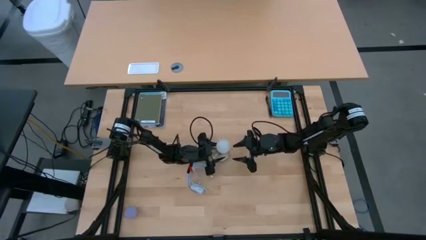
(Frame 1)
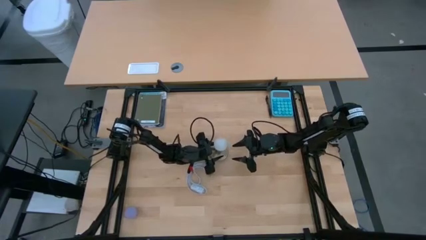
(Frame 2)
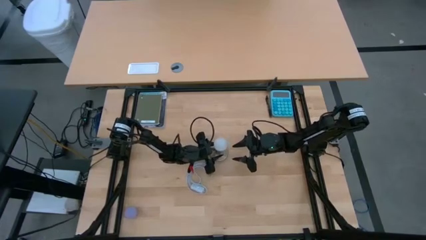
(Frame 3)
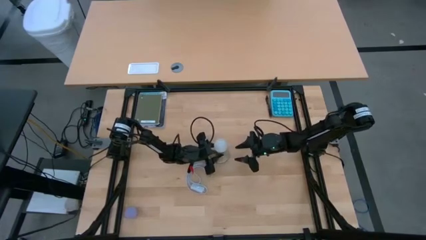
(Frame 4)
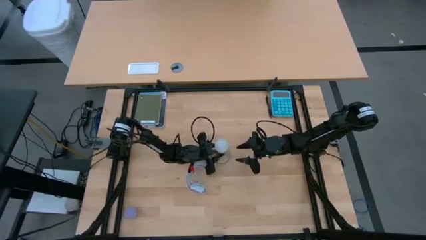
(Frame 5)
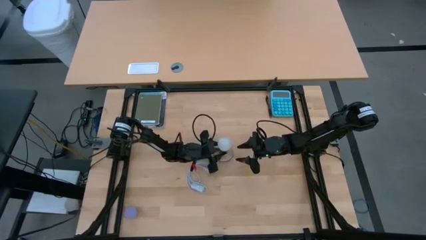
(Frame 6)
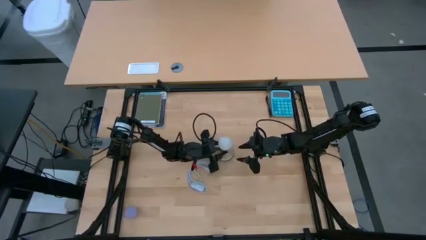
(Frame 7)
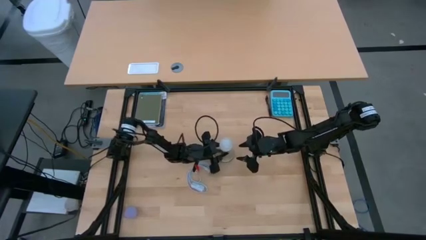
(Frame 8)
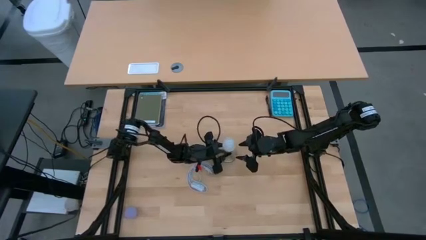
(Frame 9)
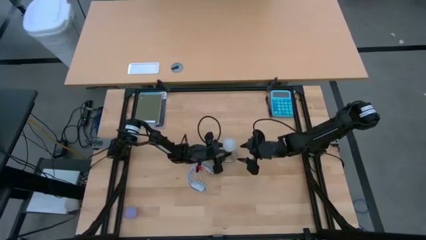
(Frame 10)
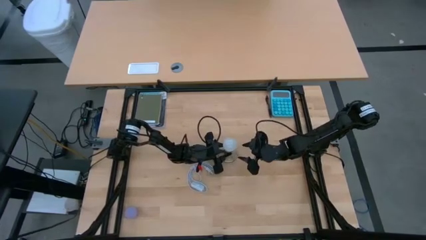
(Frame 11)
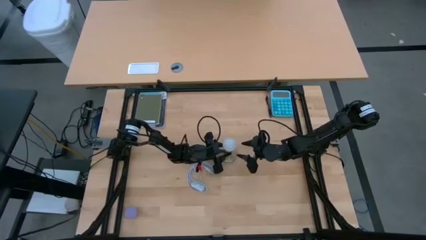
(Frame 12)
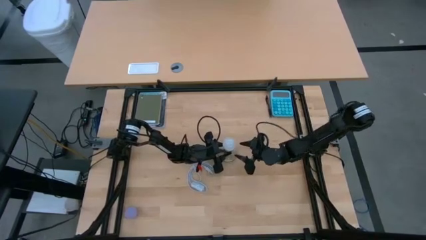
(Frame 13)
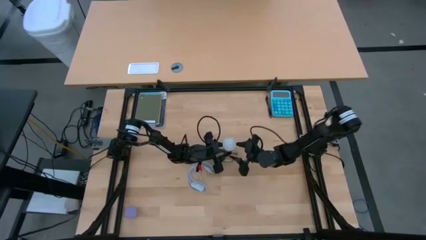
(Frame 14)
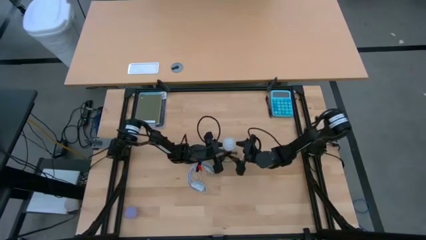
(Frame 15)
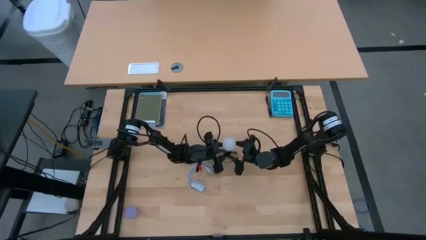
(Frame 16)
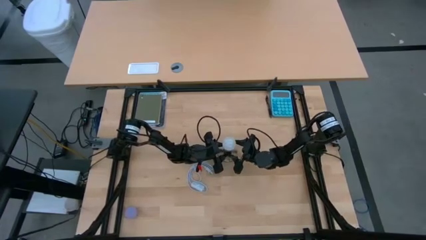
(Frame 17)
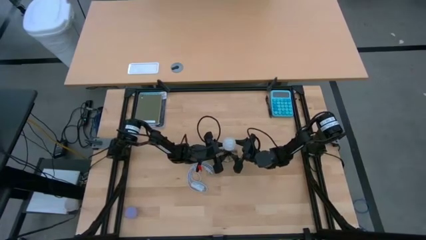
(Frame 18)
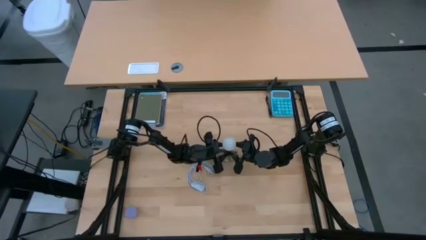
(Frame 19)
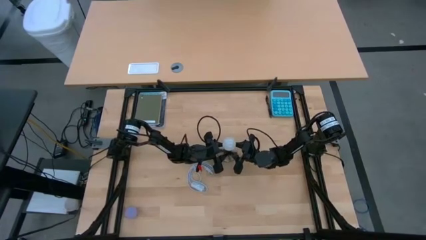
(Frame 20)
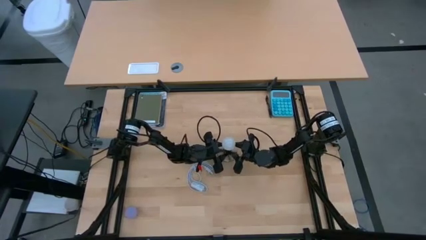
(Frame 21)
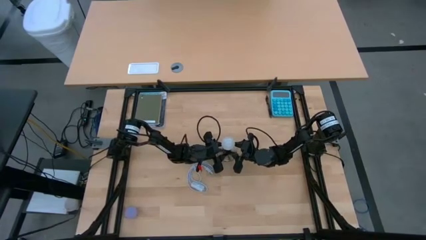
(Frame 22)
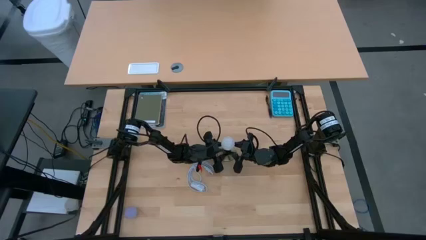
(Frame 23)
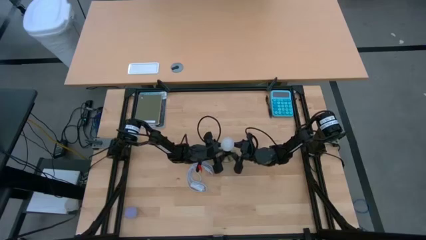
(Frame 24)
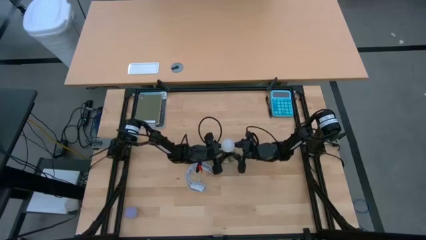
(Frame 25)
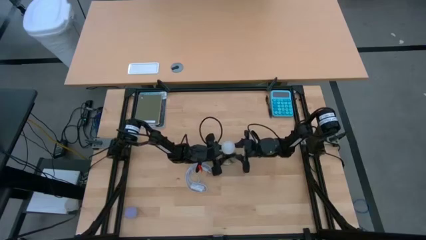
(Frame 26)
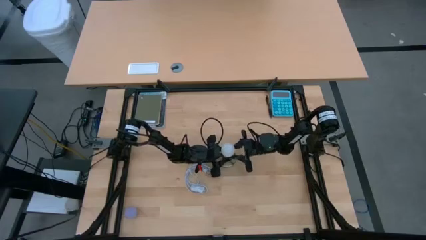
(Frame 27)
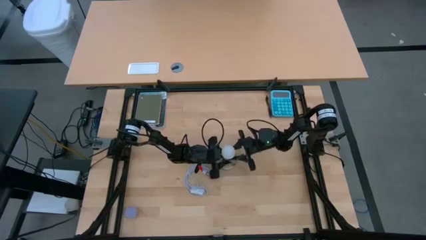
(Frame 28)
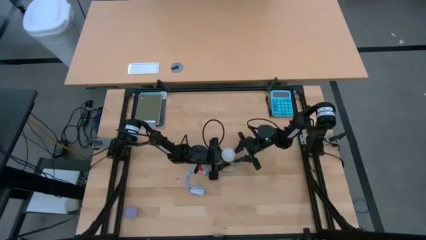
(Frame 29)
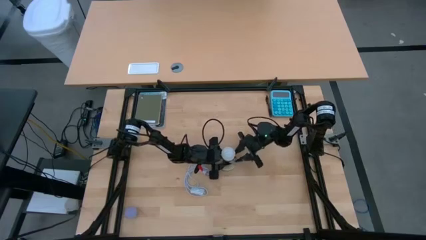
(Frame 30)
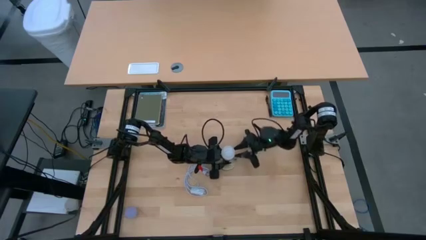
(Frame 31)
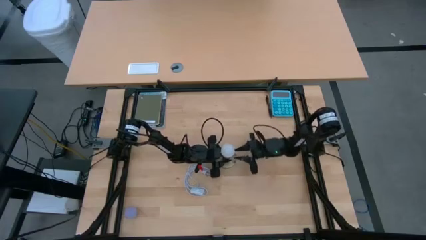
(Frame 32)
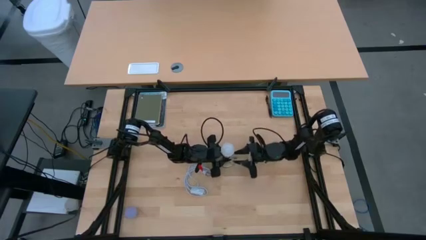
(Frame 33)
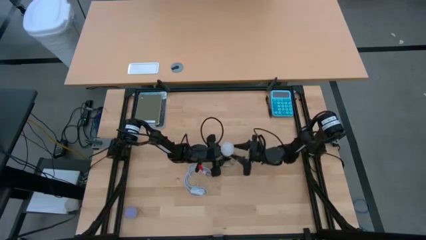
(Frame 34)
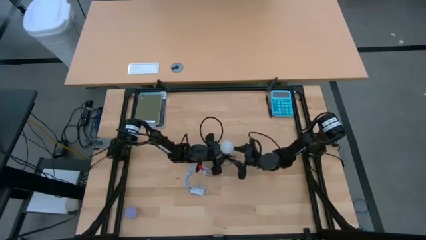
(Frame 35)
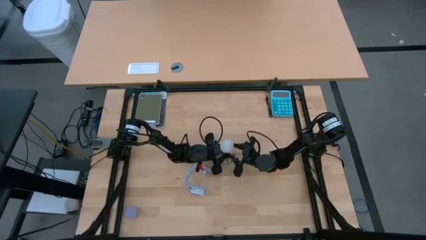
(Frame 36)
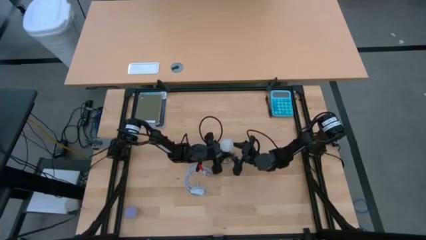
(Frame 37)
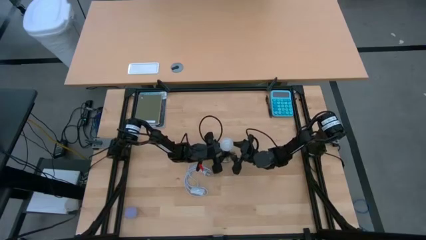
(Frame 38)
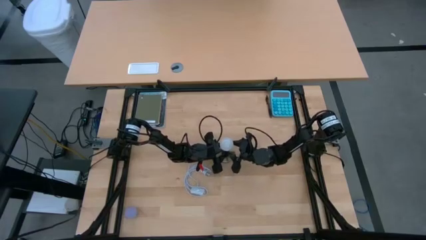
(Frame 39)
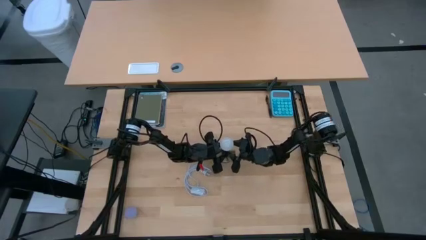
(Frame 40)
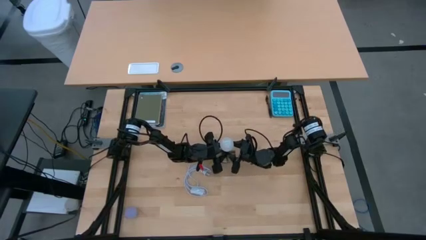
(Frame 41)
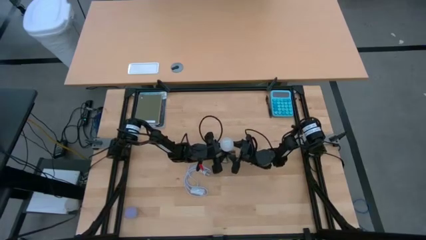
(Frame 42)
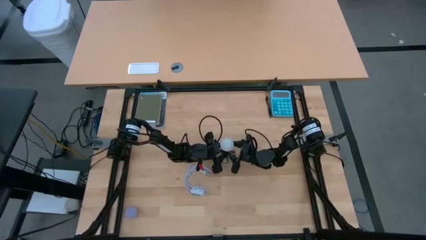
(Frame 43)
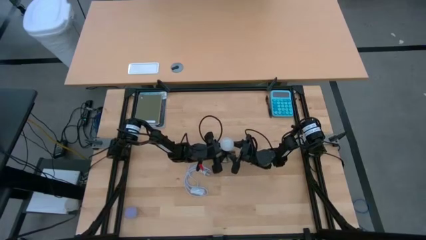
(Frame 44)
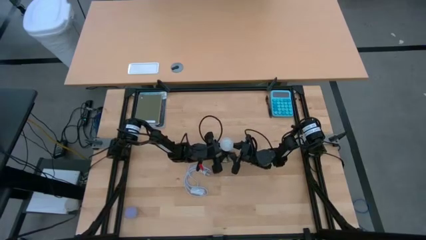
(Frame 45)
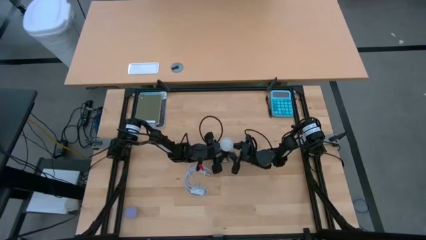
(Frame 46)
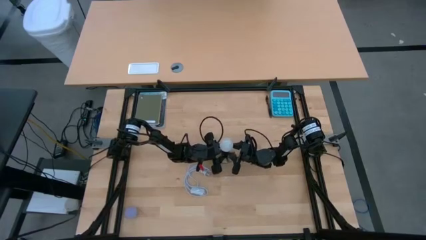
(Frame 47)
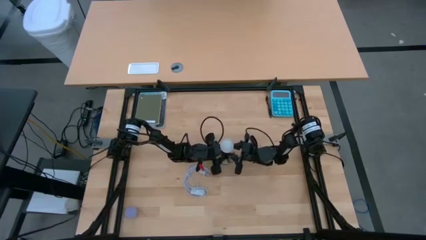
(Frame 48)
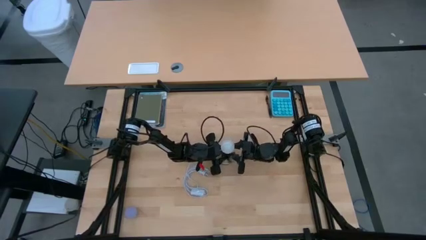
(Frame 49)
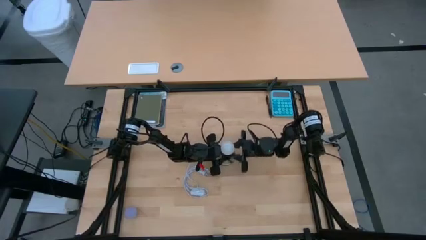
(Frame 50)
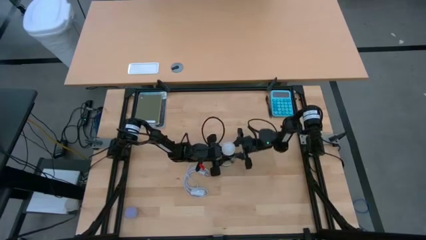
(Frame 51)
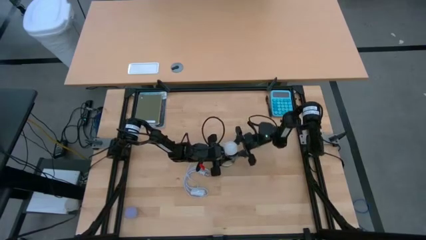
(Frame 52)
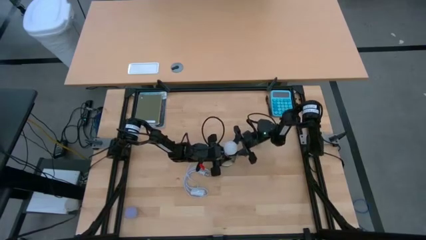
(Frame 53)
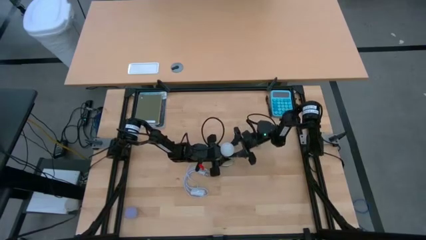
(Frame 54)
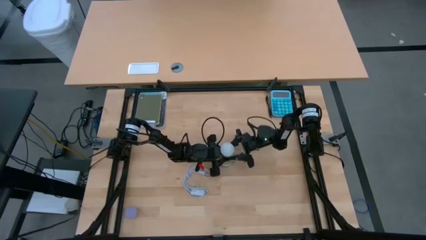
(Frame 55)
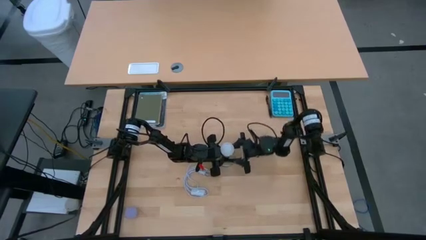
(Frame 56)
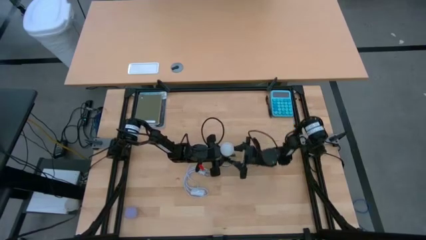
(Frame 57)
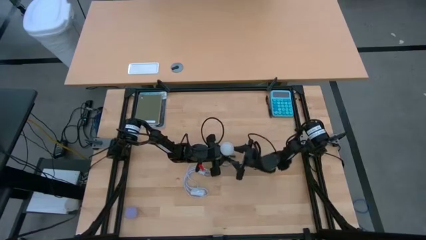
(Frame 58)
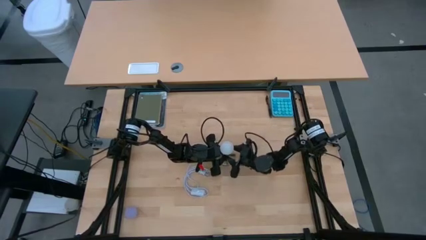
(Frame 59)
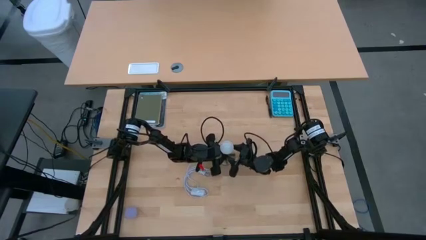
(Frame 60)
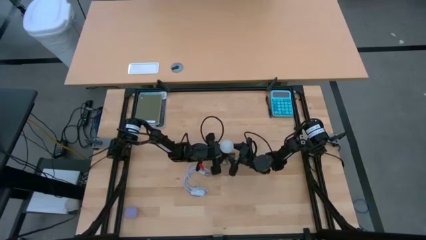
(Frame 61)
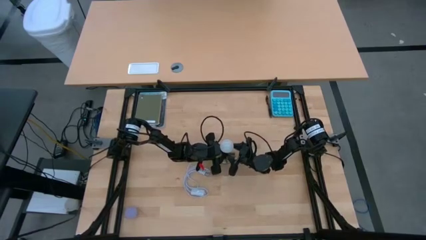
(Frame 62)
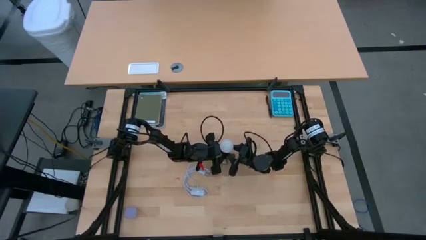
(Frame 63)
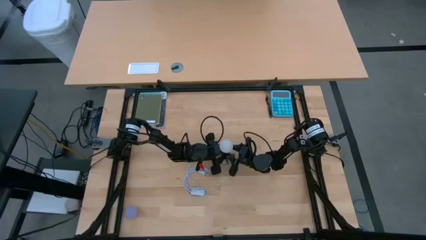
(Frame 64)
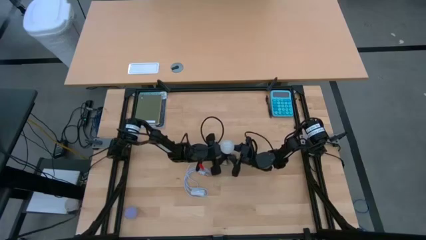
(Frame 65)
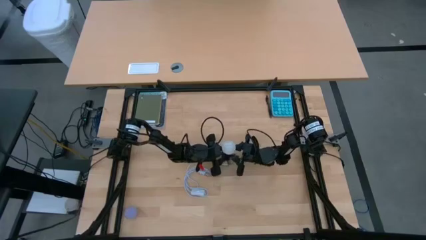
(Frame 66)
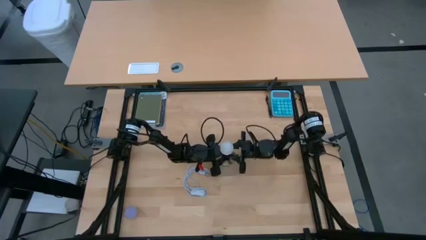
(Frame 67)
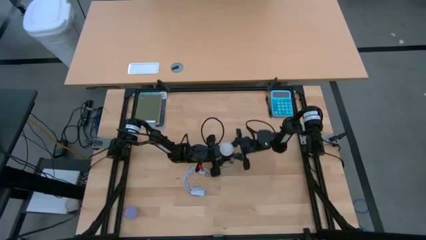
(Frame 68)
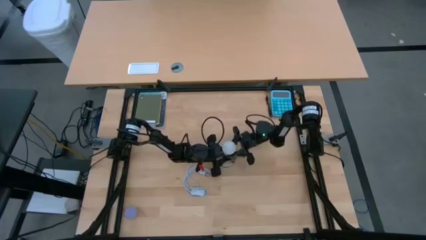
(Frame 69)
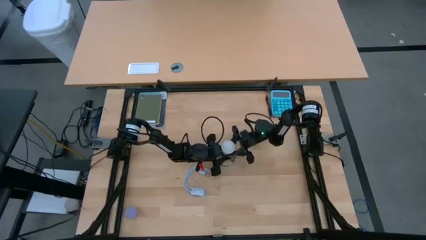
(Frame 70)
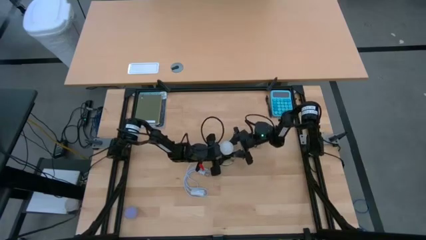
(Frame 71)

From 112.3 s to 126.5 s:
Task: Screw lightbulb
Remove the white lightbulb from the silver lamp

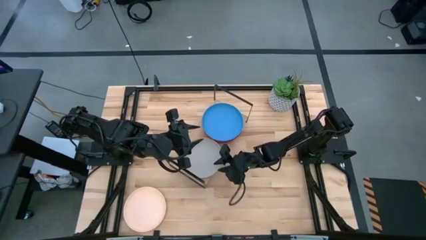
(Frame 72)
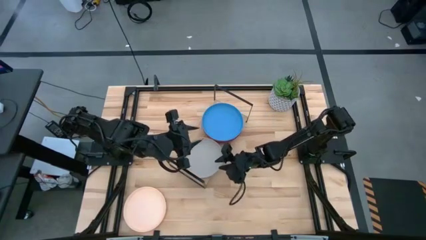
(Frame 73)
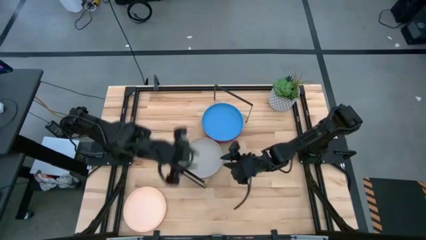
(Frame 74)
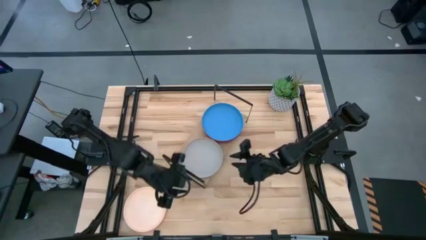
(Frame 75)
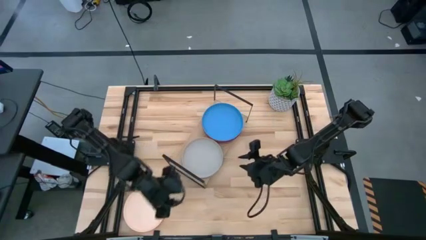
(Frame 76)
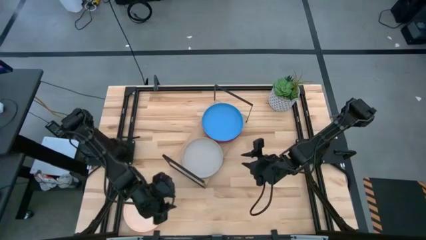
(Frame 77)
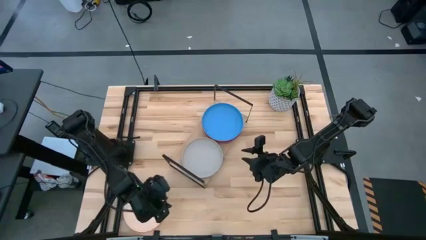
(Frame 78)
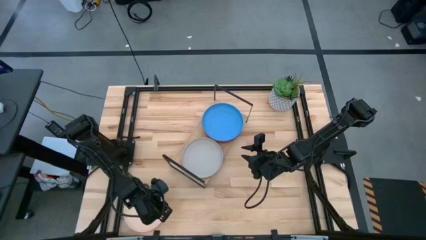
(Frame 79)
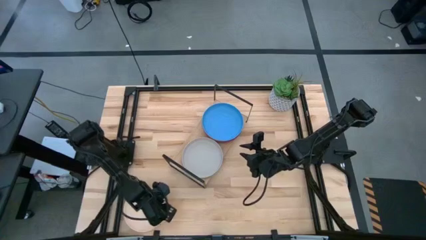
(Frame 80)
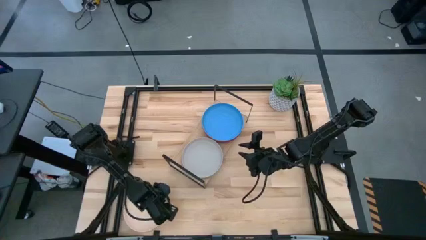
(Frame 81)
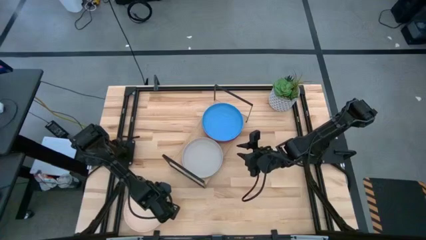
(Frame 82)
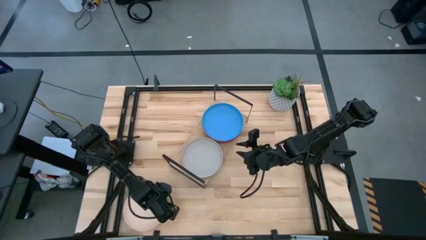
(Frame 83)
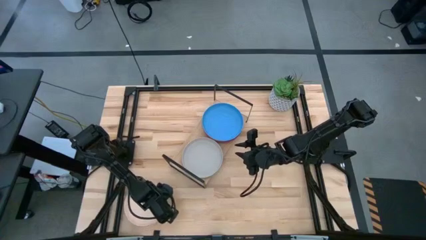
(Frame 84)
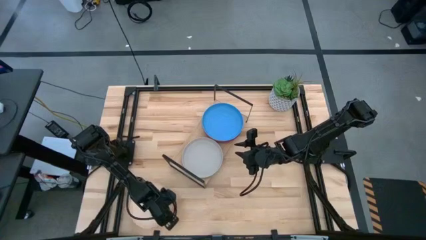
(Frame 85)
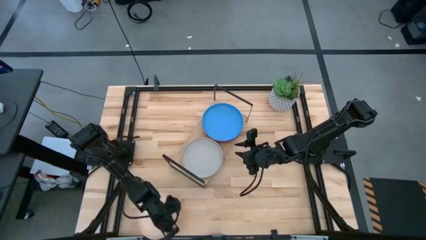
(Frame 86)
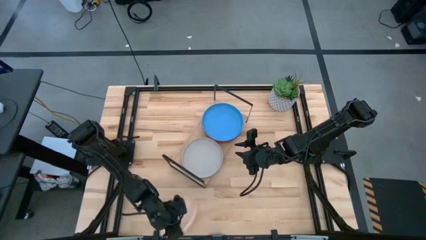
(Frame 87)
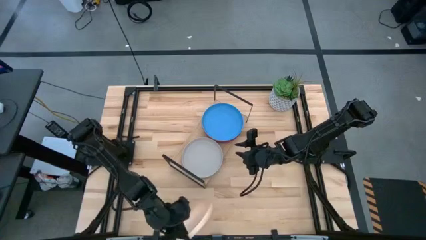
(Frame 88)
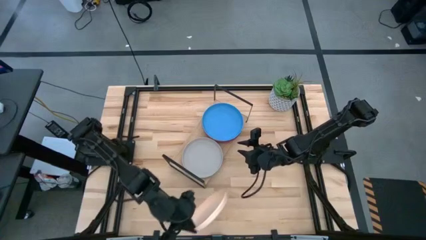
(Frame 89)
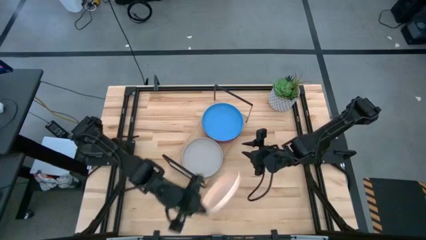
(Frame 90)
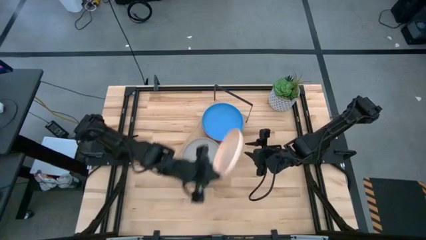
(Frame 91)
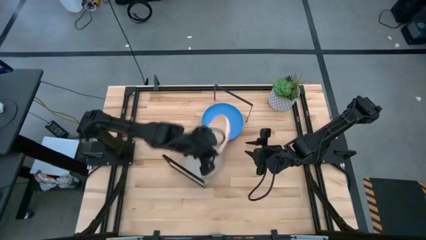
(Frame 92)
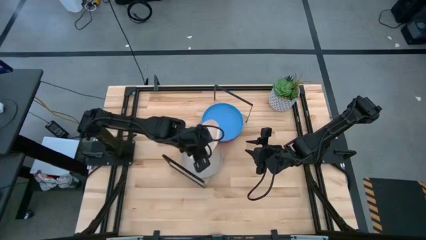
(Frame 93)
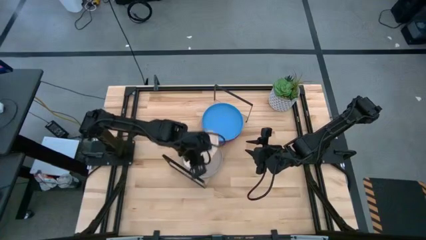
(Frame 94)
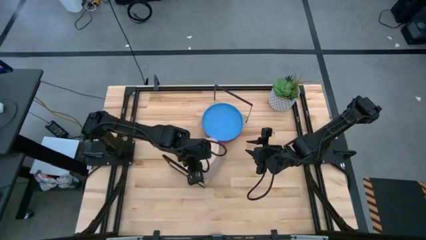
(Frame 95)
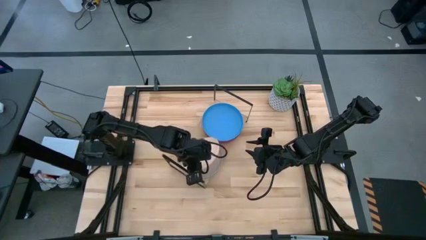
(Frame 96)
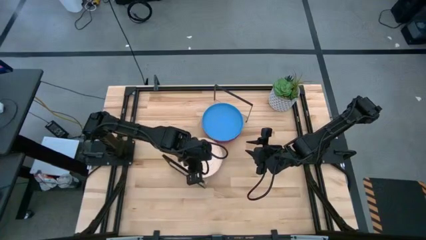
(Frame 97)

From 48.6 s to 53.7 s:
Task: Place and stack plates onto a shelf
Stack the white plate on top of the gray plate
